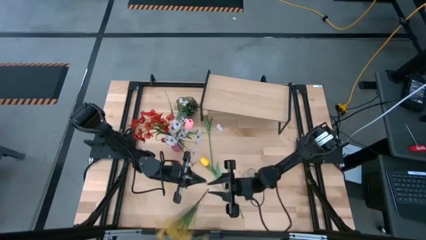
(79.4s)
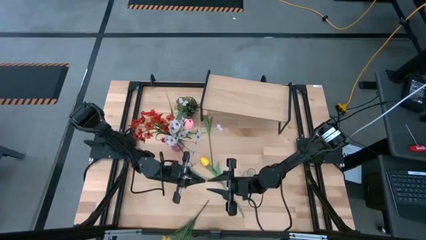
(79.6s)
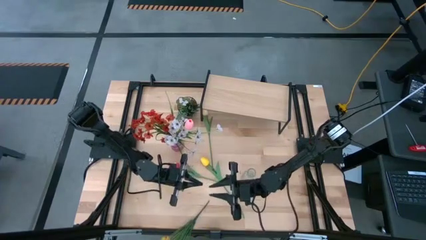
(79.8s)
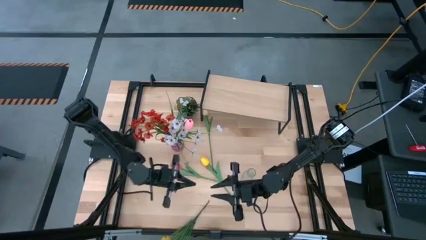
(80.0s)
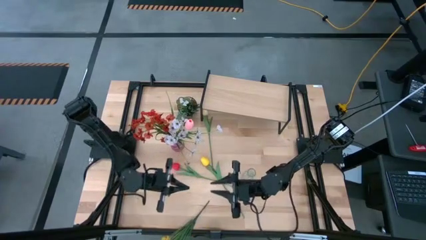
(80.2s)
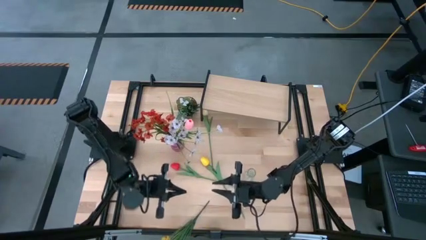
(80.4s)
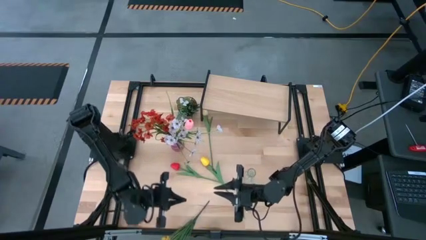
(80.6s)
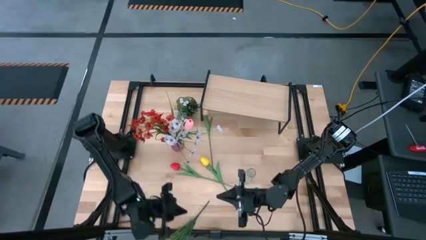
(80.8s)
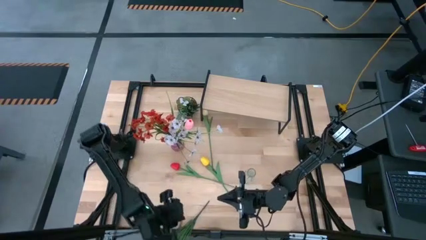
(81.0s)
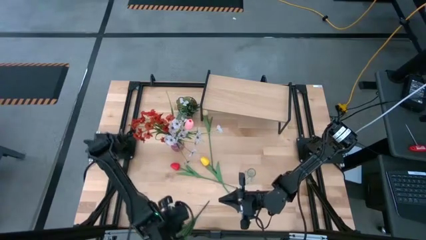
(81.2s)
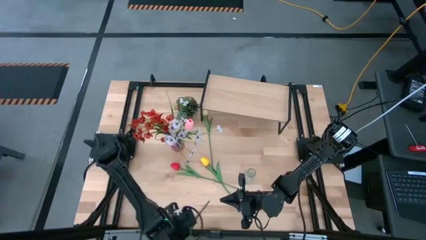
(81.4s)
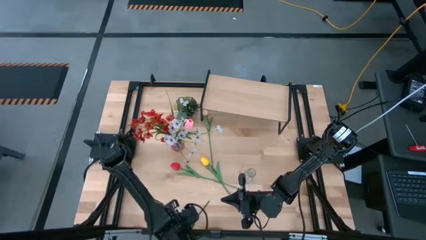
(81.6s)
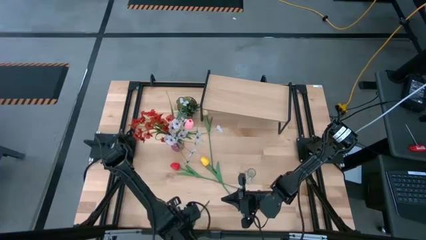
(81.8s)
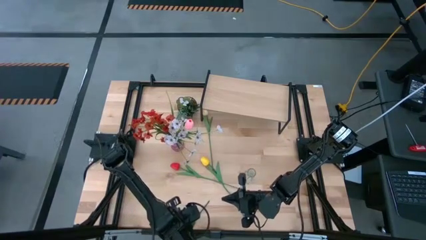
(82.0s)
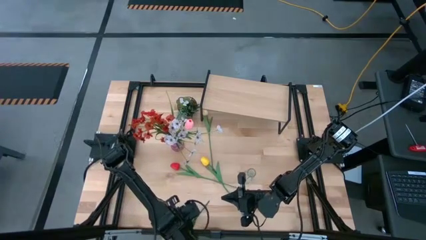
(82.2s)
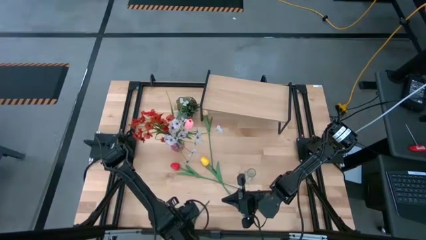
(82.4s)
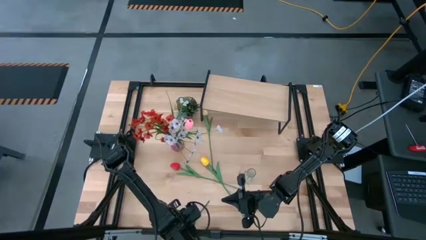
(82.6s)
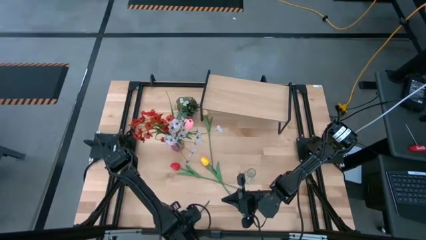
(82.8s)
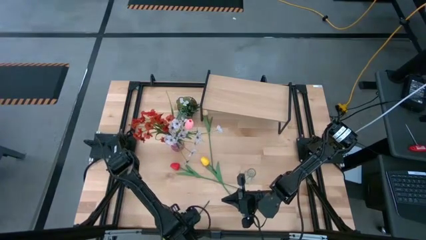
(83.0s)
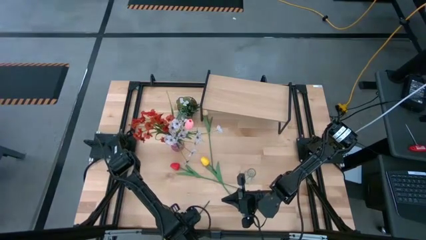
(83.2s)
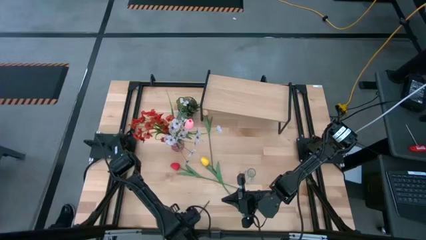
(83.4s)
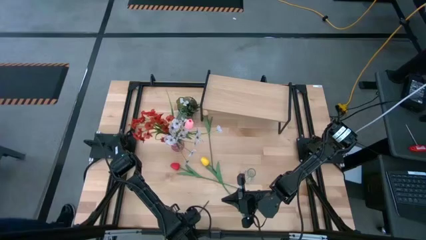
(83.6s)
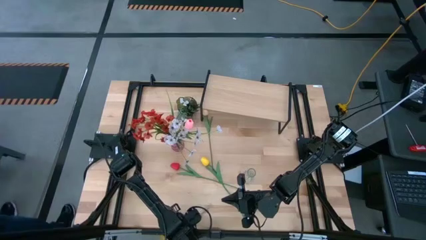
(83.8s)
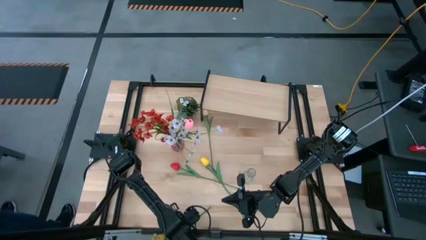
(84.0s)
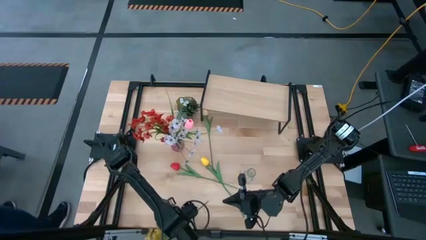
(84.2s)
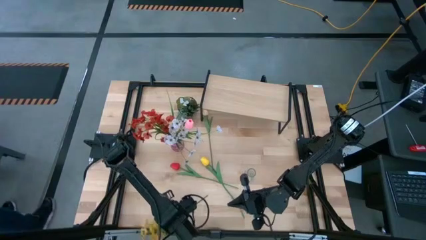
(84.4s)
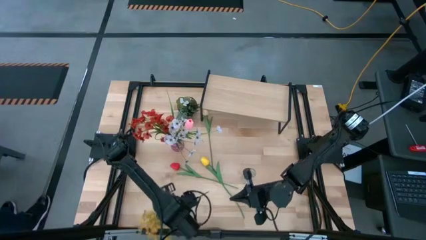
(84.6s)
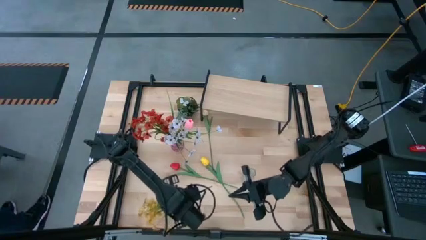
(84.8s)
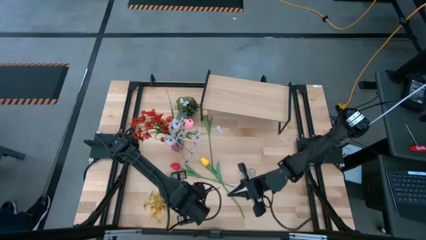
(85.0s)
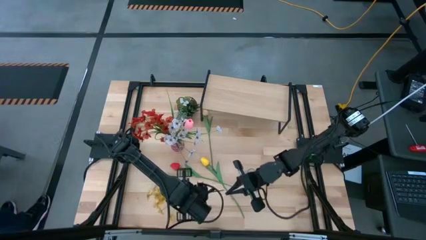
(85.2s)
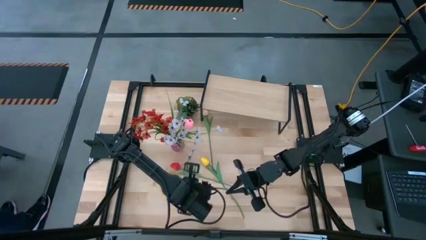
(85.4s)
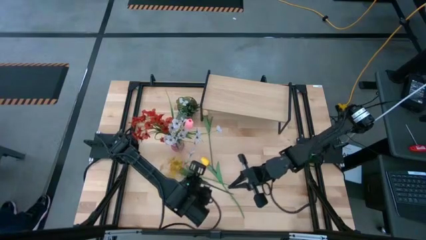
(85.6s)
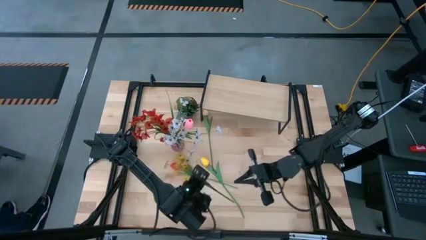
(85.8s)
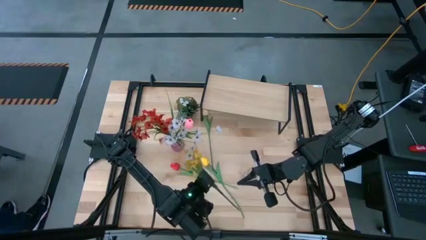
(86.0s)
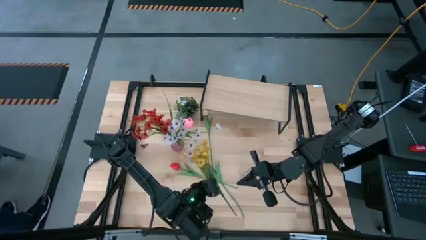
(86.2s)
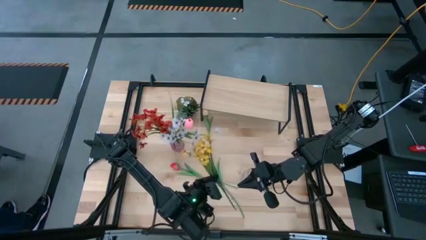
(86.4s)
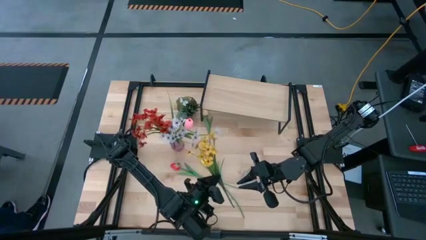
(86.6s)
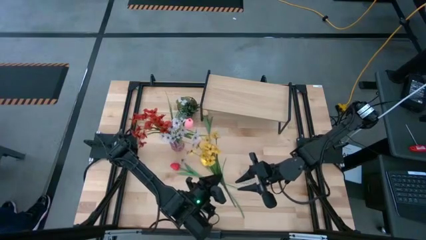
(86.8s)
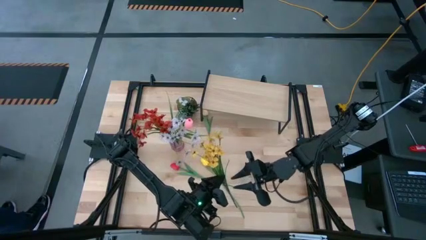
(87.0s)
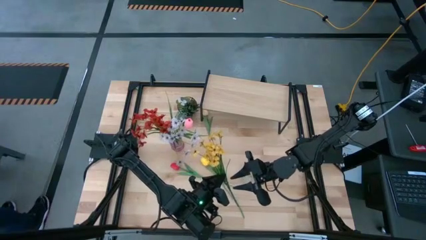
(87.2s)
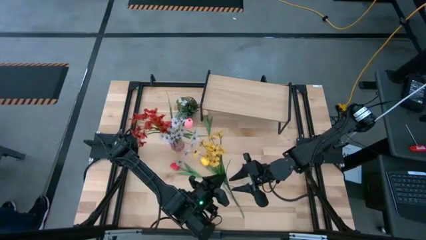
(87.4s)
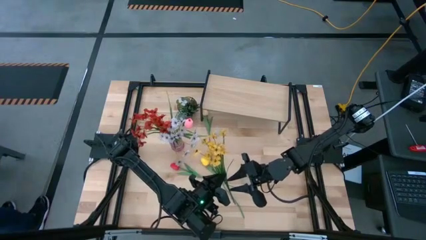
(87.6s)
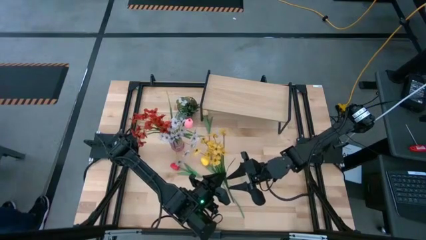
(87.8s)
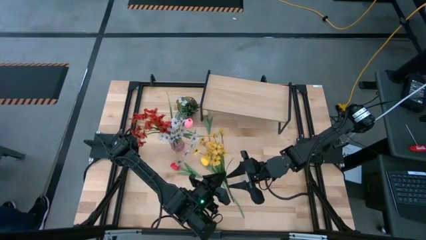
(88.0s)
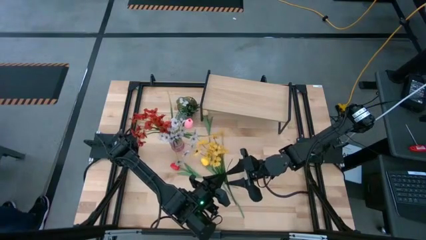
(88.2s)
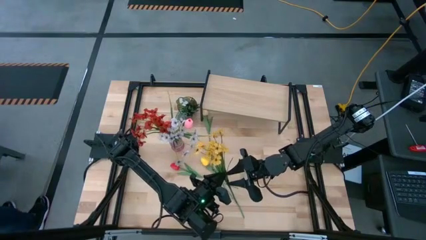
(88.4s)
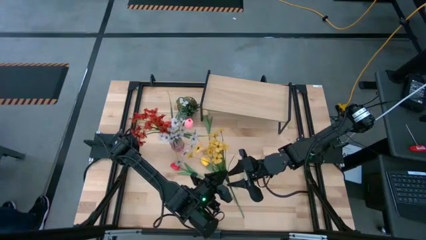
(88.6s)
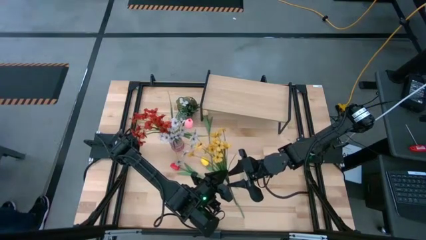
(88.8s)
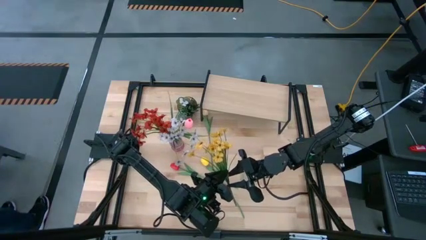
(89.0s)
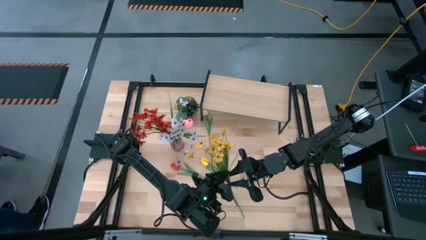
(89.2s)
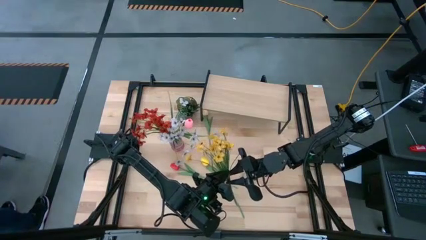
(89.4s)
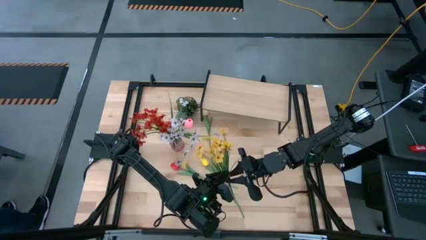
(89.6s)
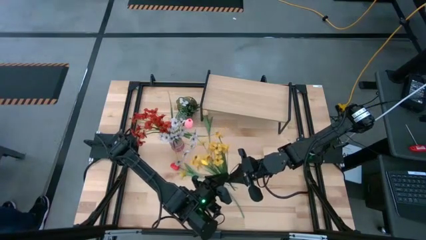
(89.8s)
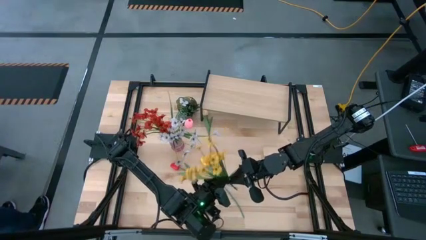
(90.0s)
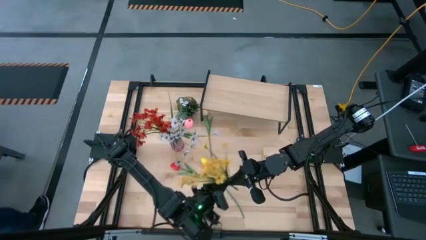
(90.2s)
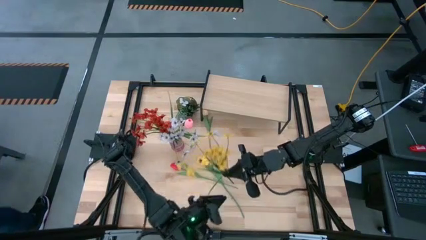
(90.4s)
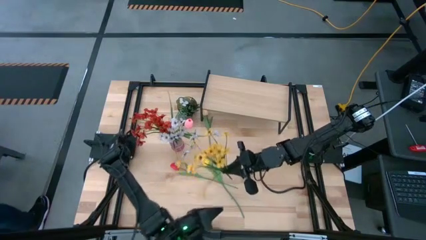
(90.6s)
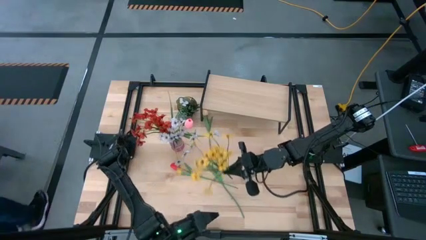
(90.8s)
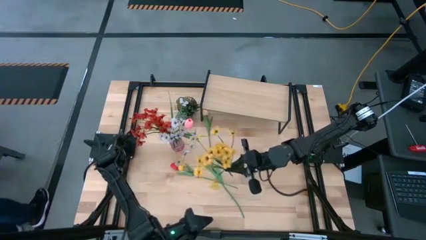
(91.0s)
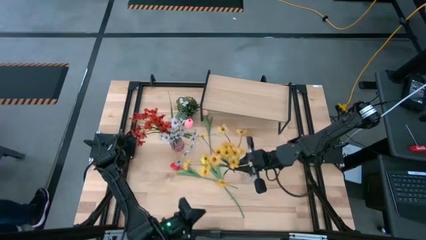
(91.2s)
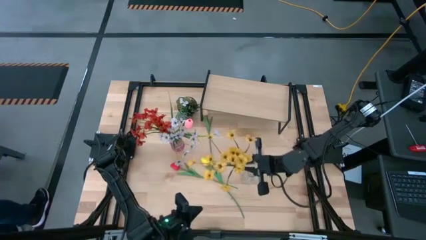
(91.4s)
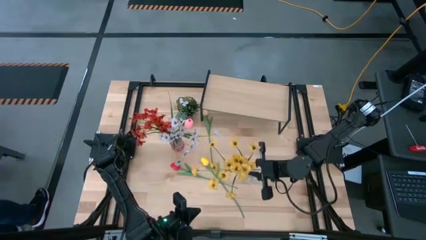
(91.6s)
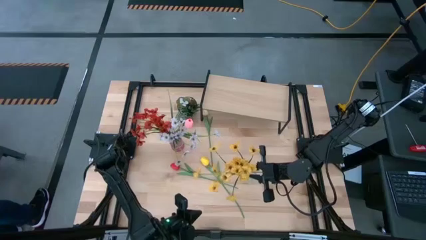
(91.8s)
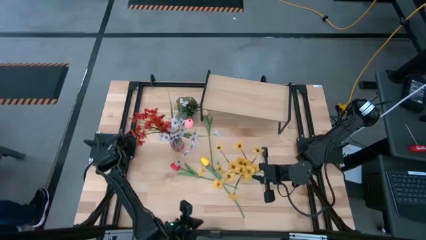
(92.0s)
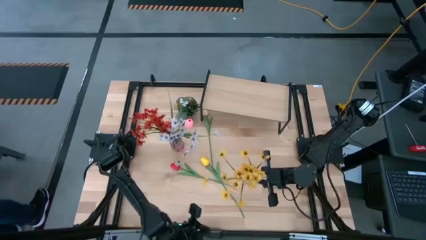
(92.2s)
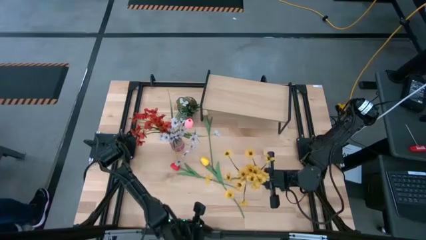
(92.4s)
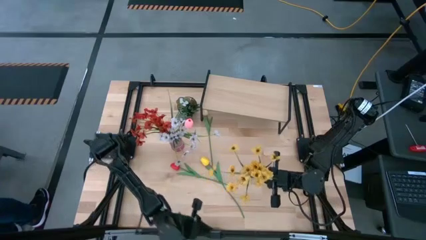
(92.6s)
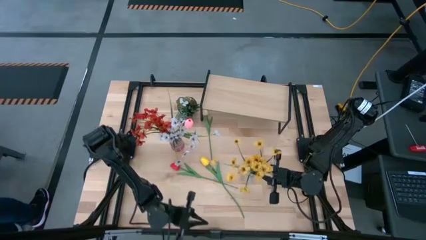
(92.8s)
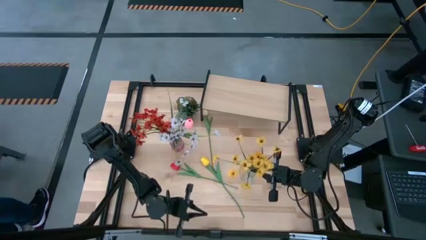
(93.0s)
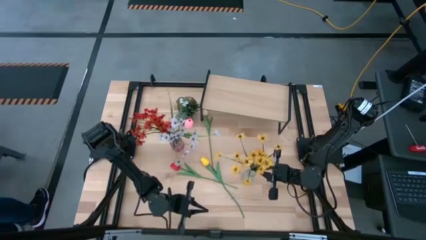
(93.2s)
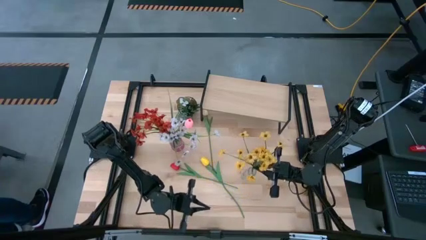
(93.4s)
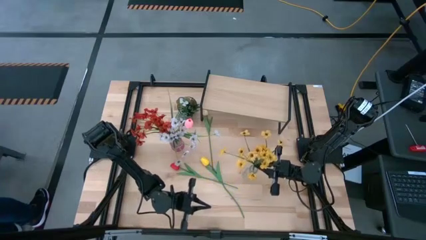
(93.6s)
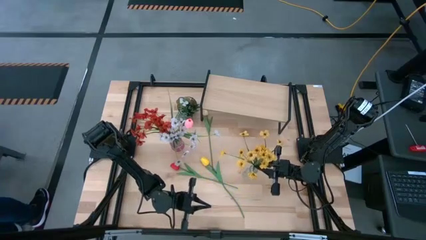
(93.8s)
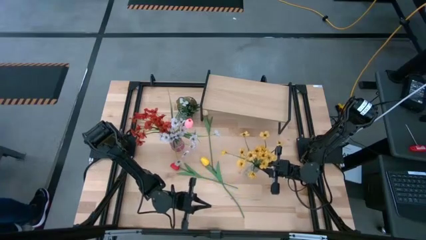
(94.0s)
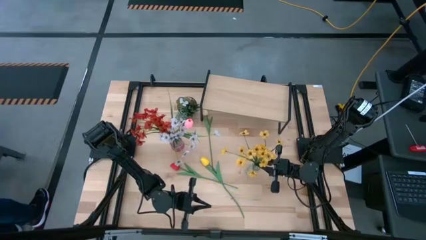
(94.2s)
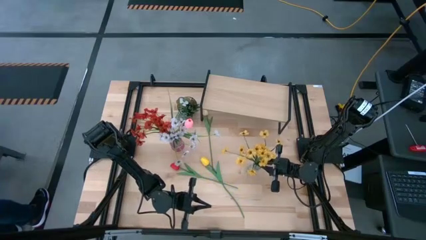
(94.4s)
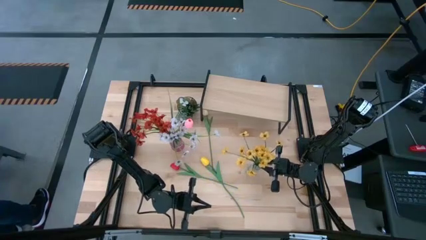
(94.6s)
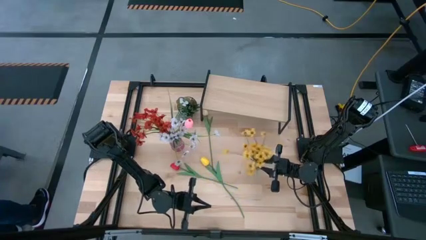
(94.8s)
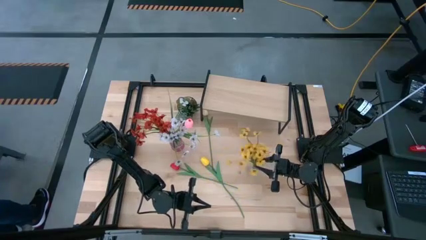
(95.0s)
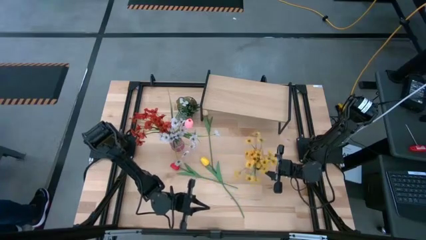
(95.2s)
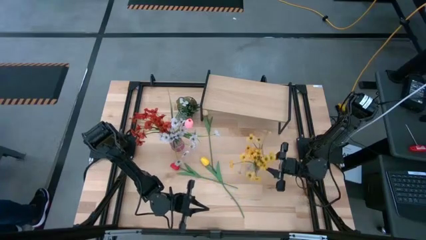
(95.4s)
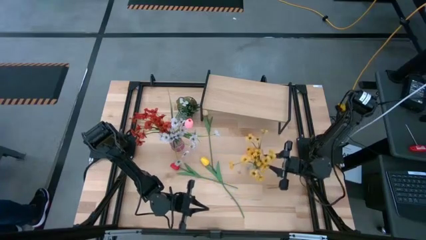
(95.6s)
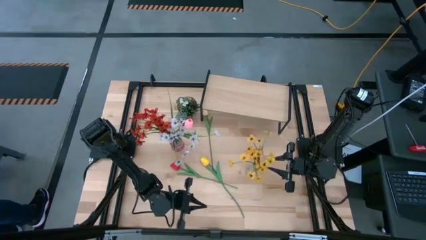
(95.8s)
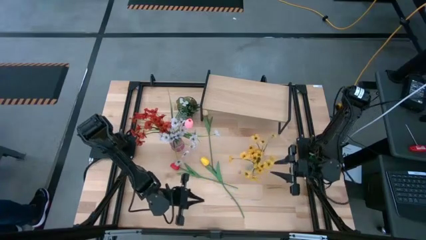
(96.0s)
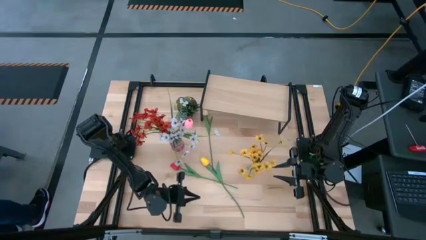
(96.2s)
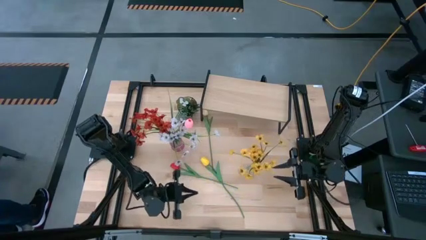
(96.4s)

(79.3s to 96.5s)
Task: Pick and place flowers into a vace then onto a shelf
Put the yellow flowers into the transparent vase
